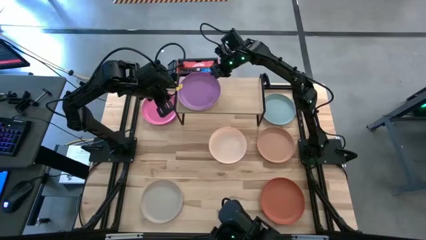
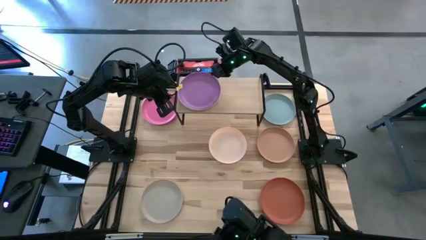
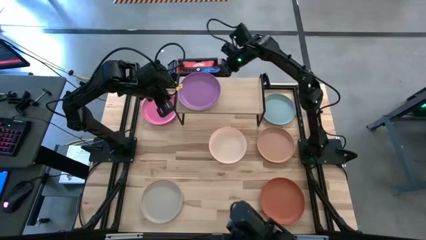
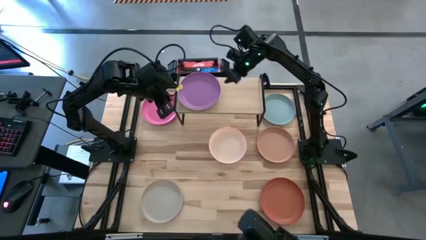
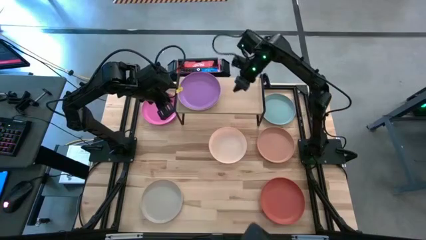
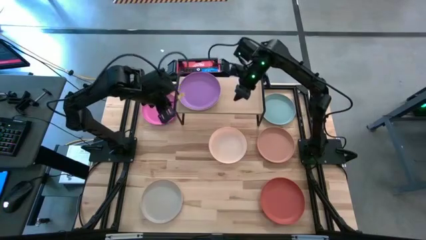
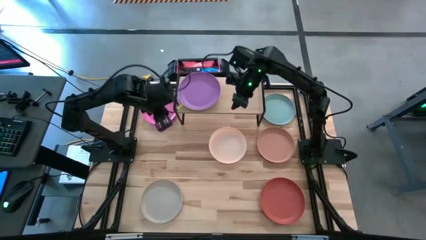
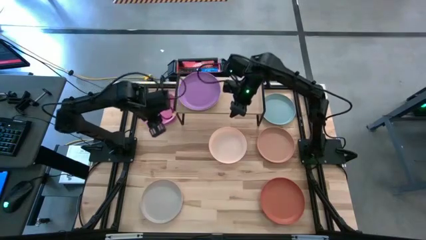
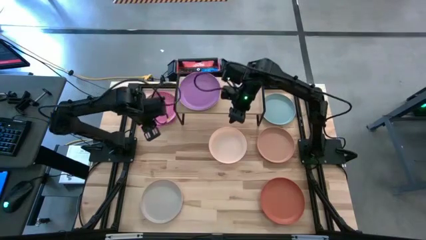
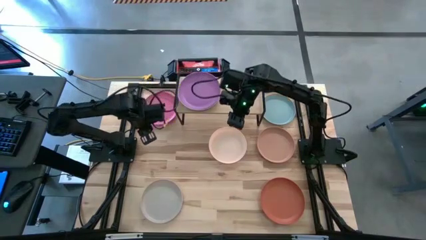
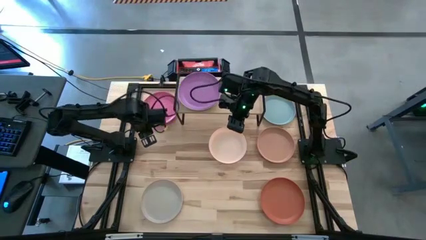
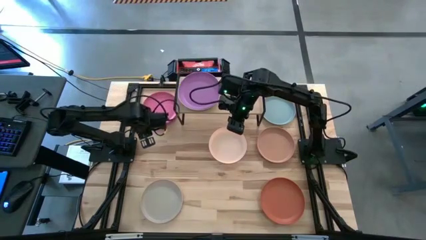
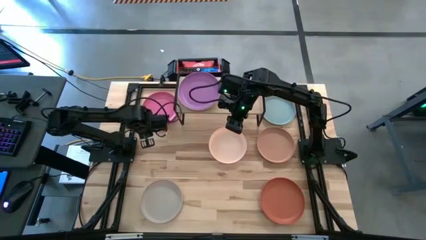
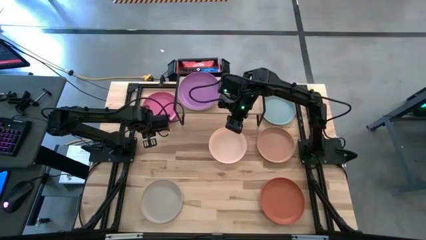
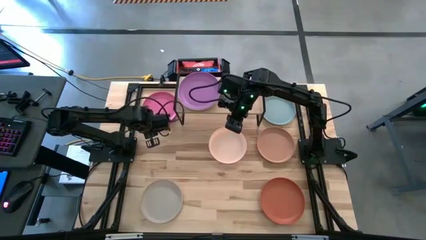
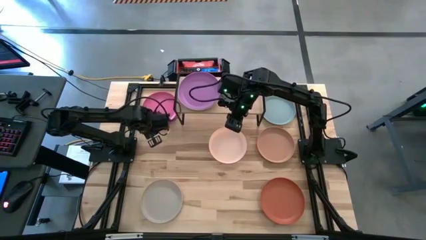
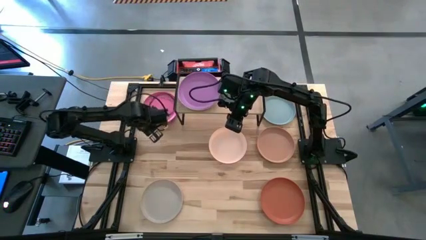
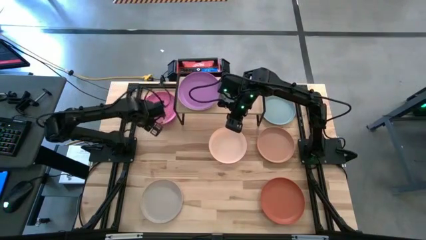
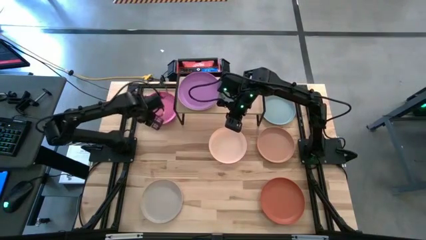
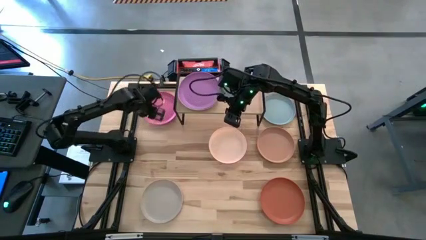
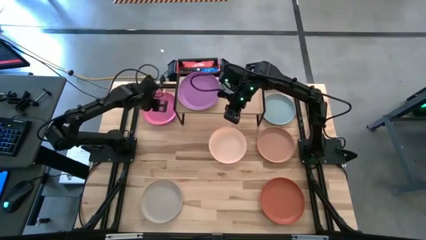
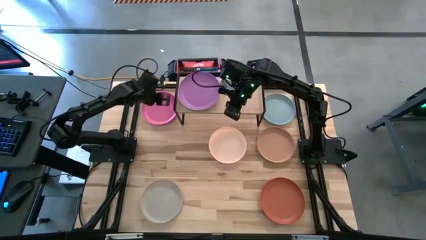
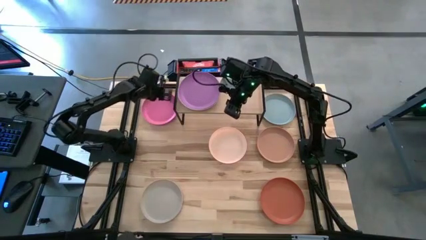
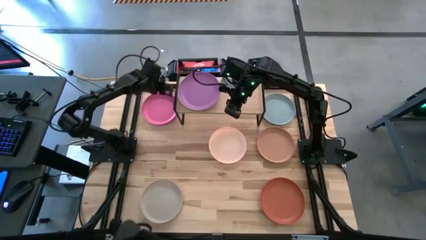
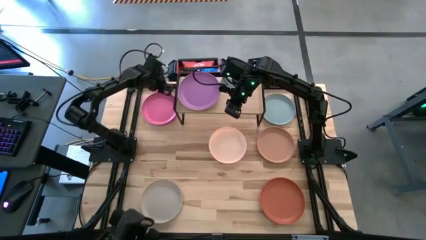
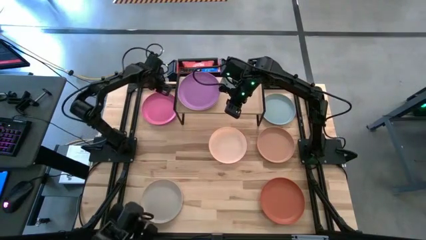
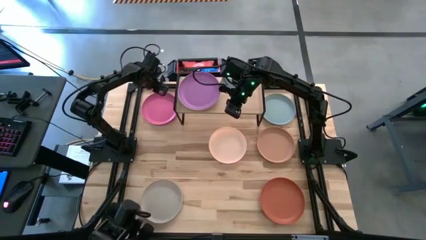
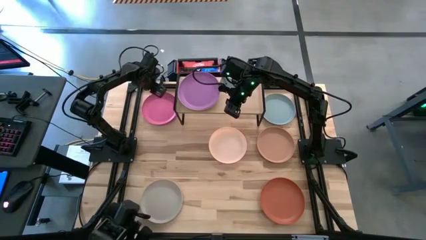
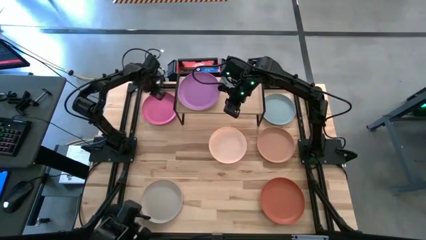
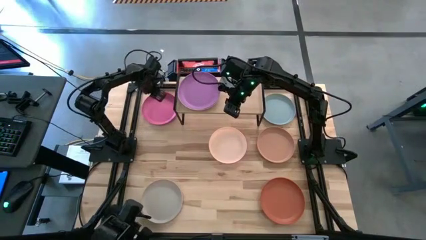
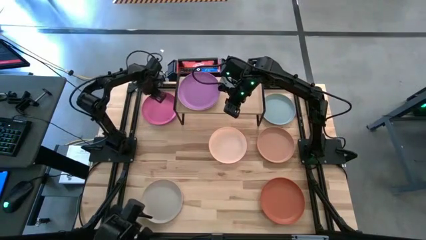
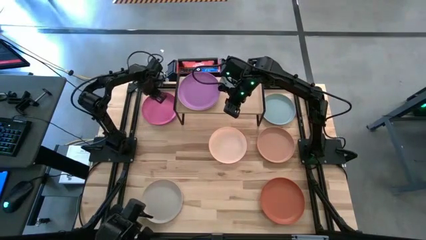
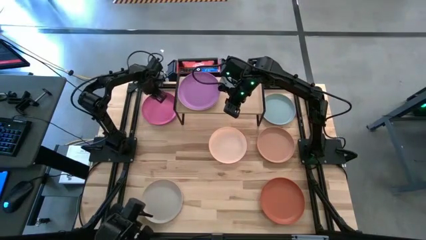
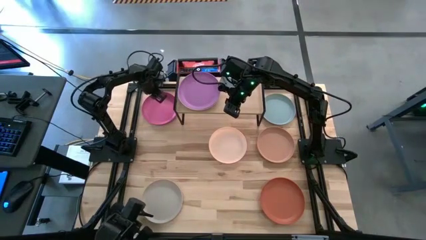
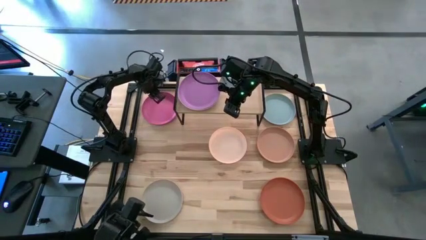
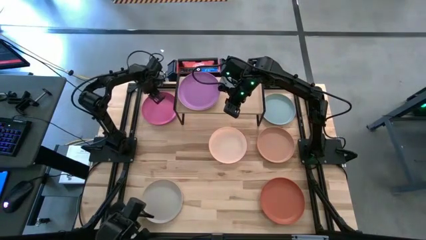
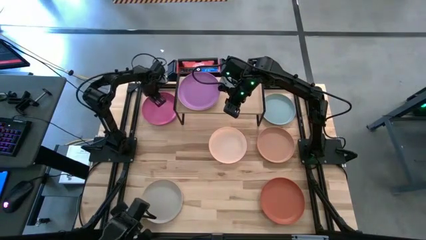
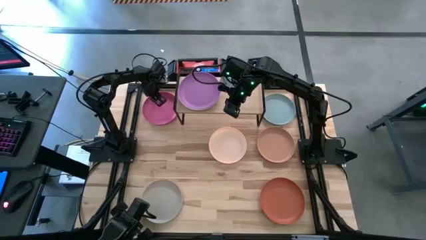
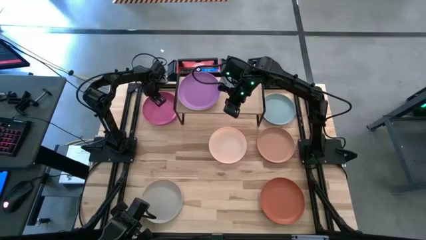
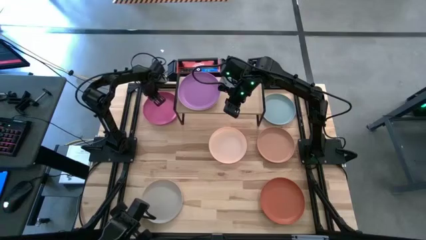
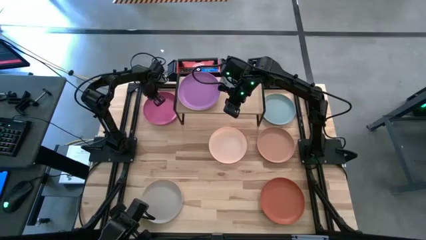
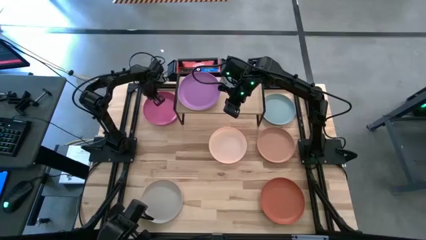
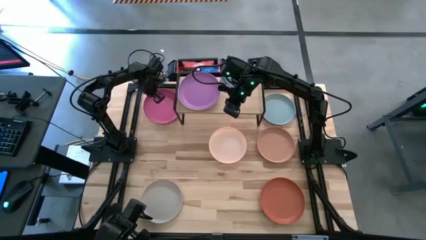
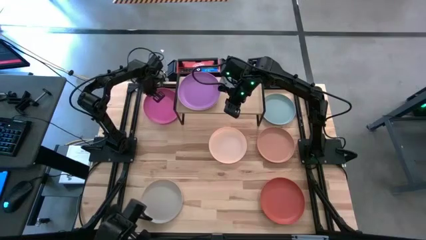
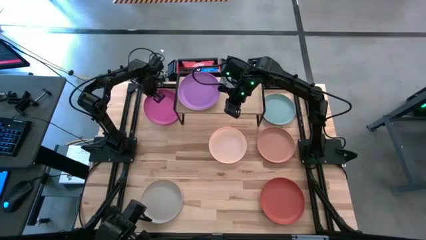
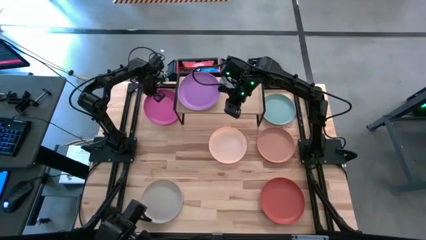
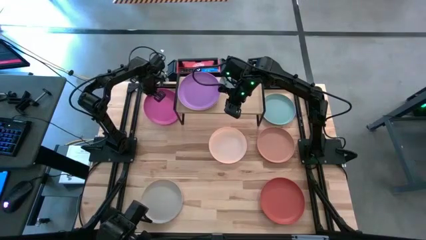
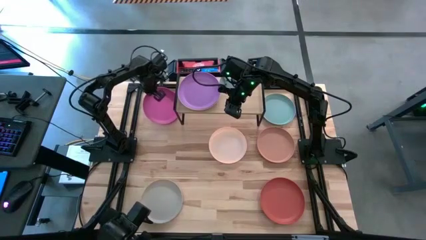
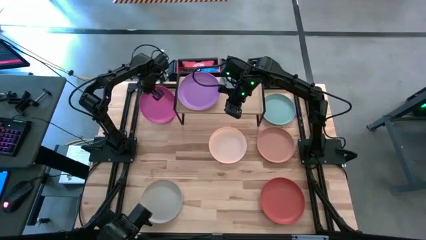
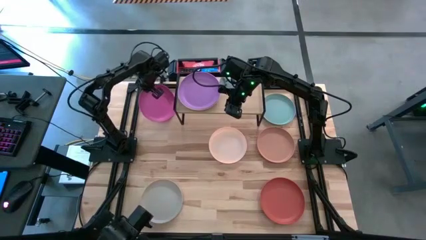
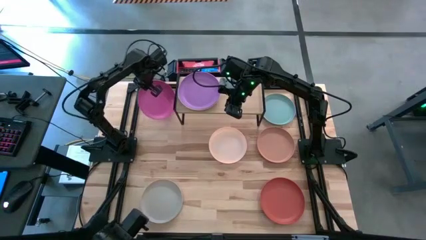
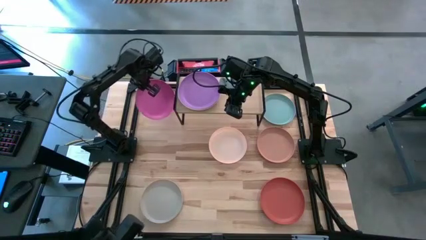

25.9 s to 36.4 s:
Task: Place and stack plates onto a shelf
Stack the pink plate on top of the purple plate on the shelf
